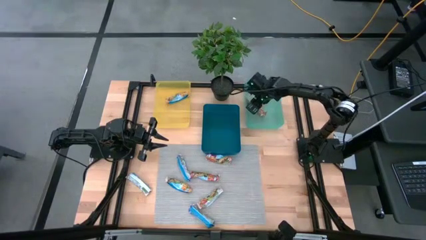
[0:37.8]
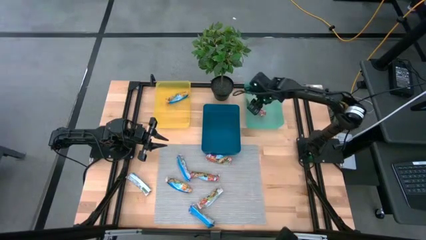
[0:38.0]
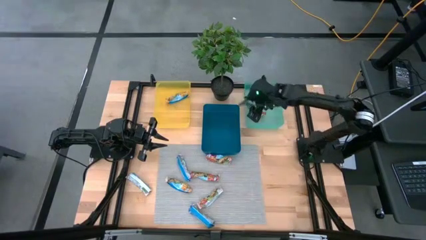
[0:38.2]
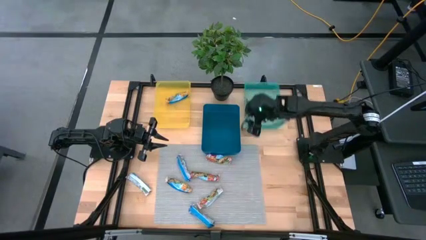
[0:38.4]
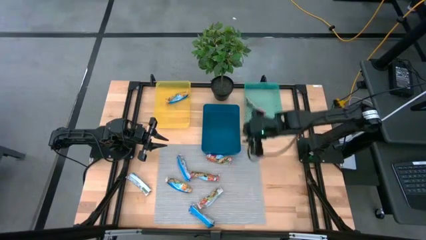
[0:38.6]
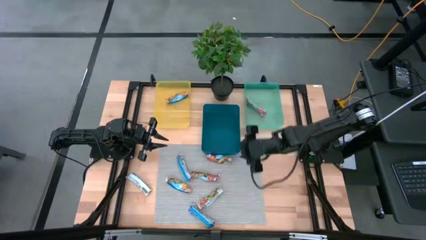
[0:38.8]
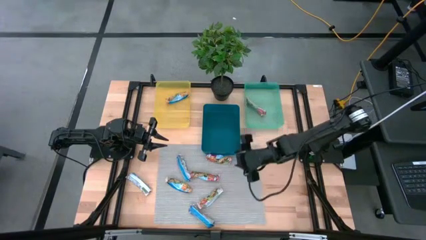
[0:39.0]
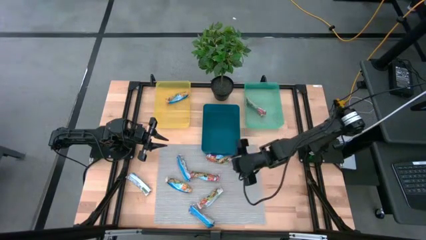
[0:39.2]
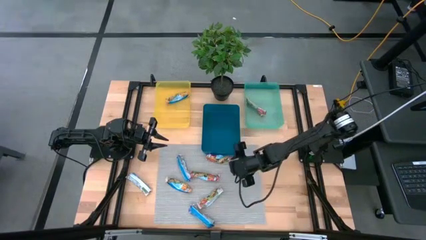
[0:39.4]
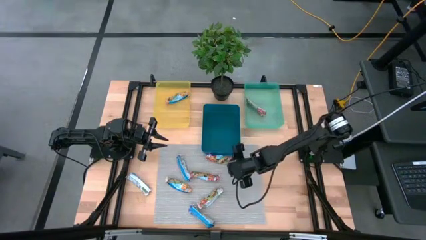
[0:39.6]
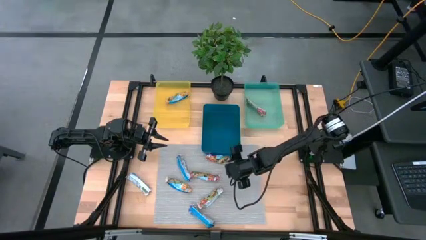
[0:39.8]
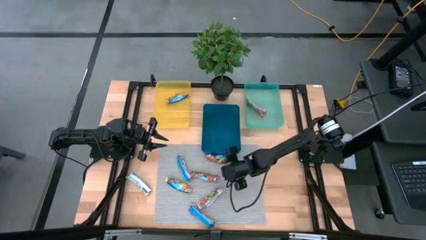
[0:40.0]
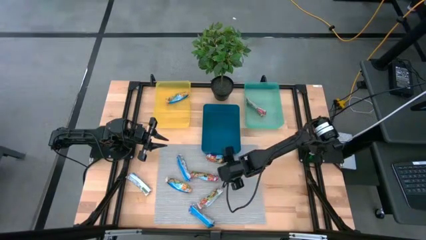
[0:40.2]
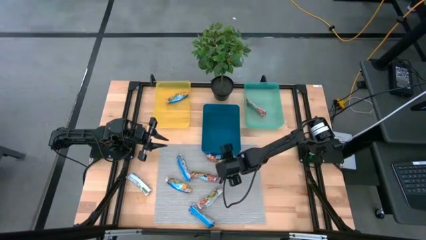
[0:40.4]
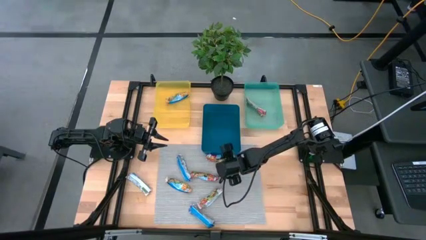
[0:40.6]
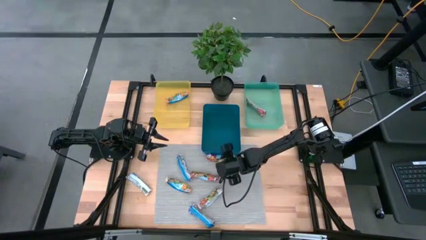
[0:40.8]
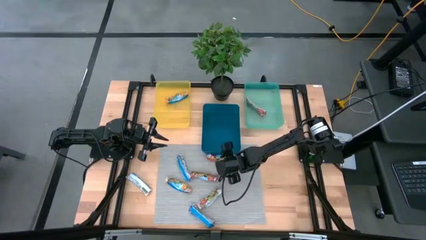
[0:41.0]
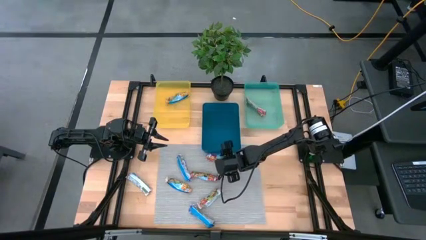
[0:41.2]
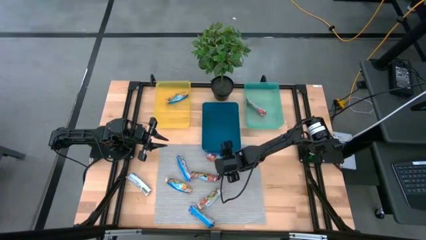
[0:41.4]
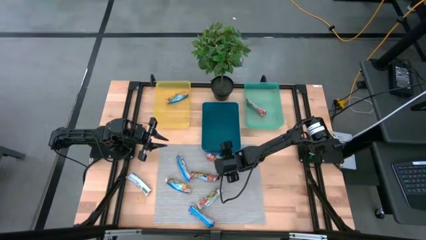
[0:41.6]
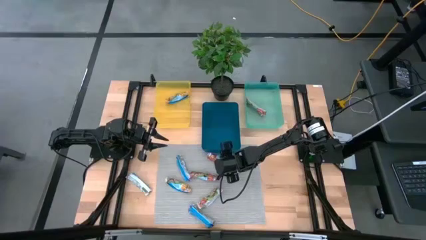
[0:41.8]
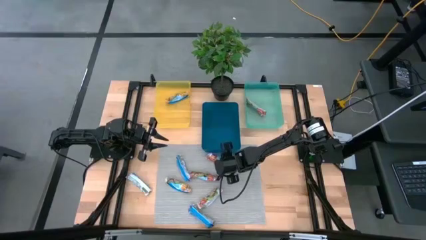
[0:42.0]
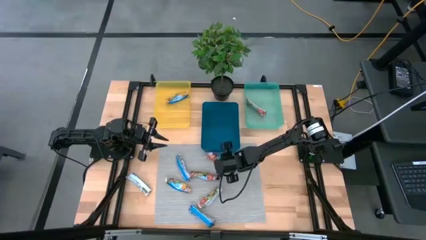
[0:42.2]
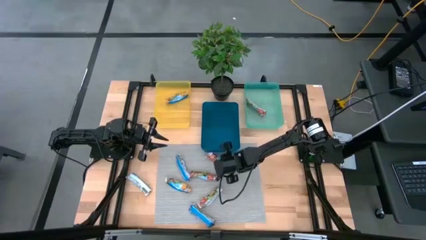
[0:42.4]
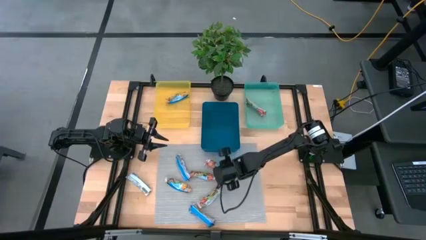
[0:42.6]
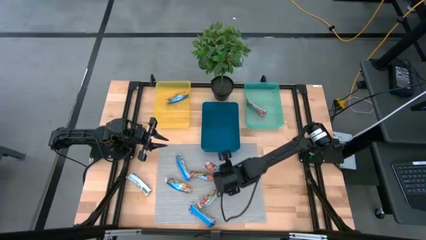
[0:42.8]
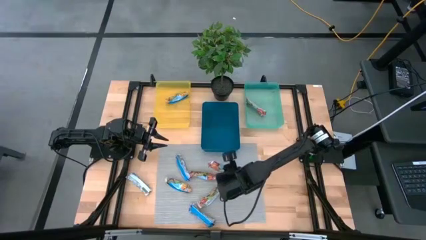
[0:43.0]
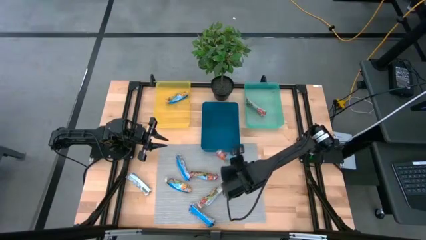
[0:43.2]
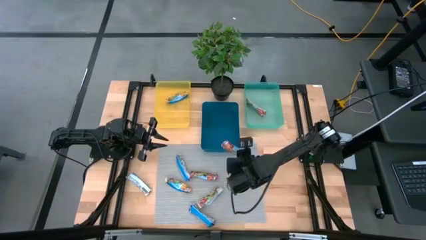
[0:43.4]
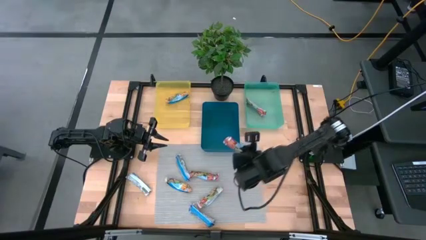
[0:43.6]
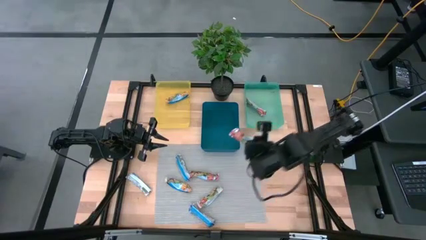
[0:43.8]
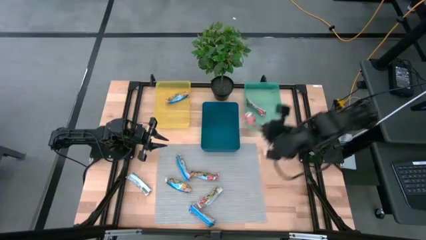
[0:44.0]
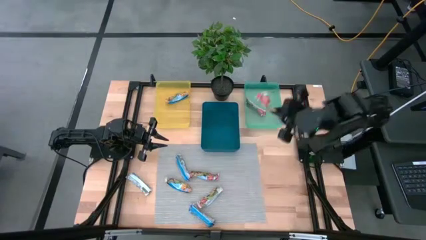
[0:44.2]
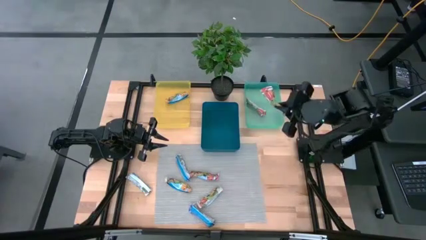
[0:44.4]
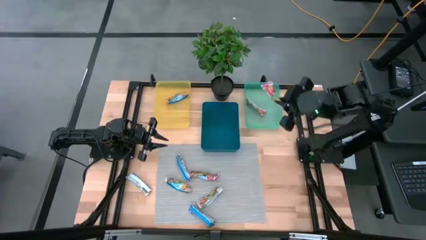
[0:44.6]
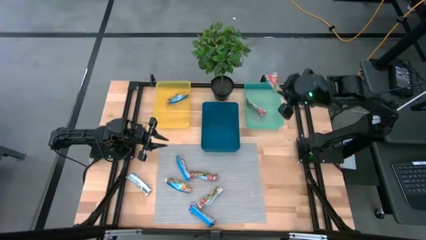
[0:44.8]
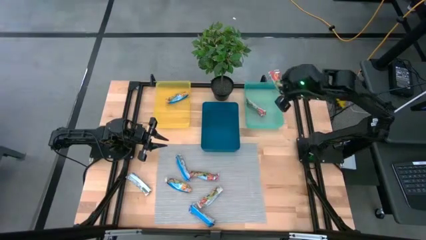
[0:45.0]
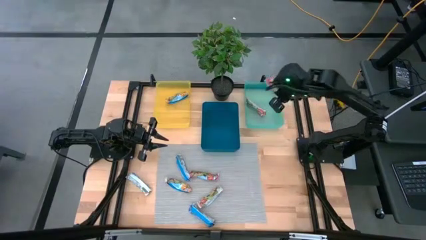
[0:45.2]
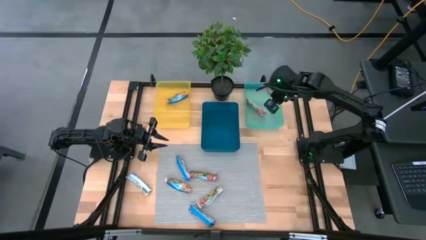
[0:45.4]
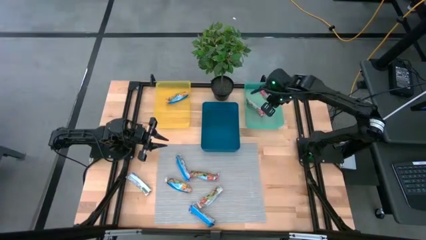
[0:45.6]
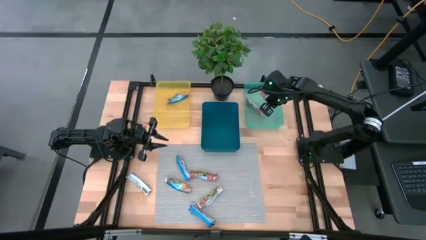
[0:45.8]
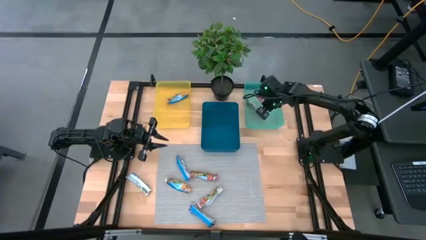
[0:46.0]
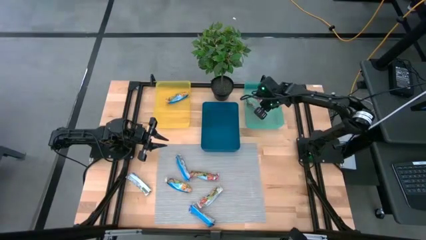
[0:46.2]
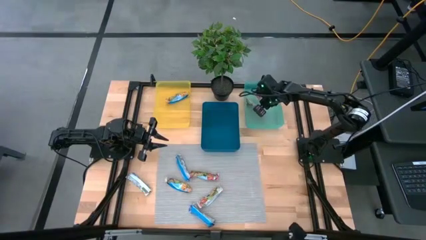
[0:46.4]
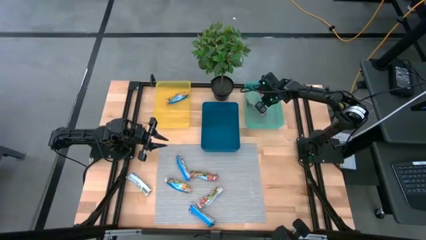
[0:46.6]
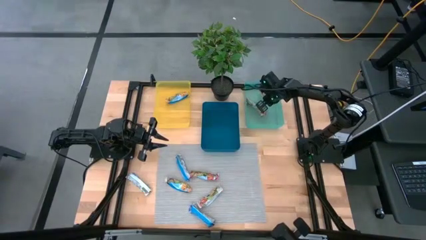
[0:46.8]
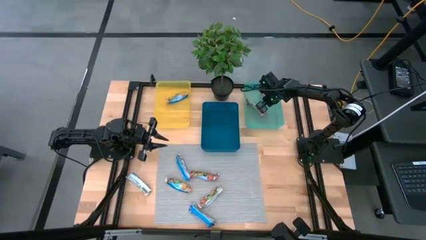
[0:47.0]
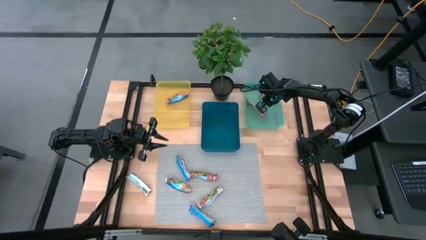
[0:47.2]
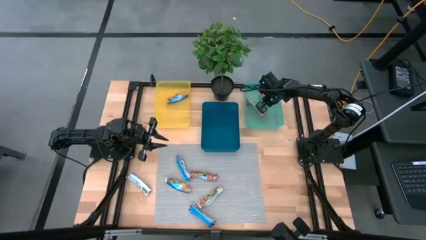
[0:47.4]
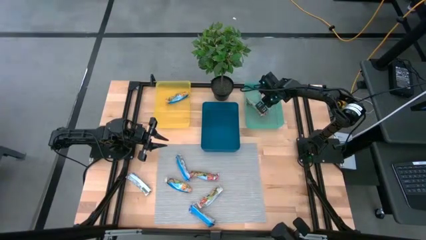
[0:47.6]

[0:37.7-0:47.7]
Task: Pick and place Granola Bars by type
Put the red granola bar into the green bin

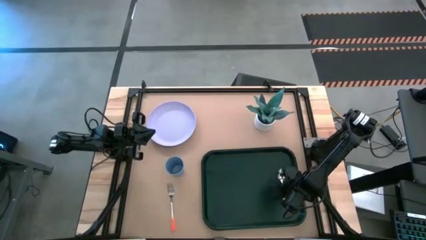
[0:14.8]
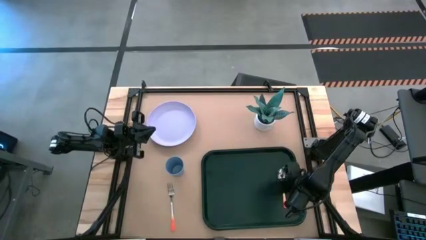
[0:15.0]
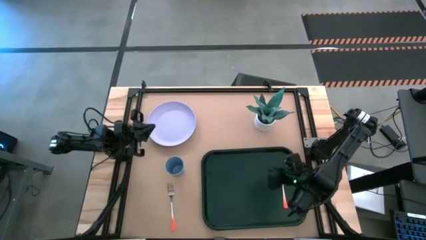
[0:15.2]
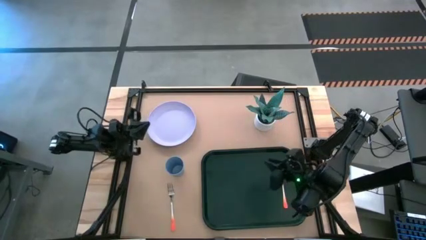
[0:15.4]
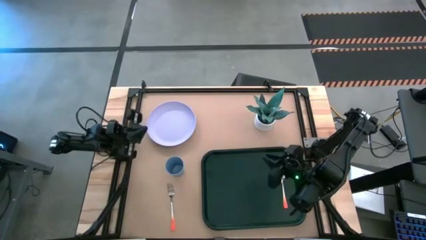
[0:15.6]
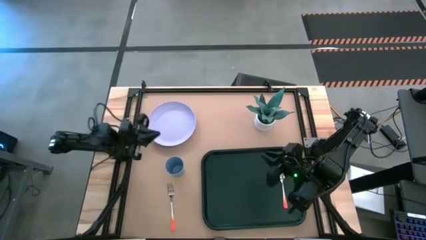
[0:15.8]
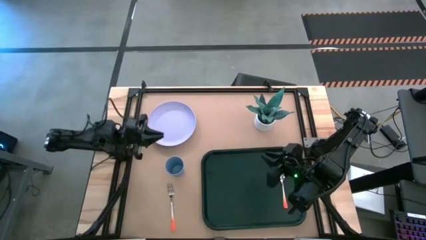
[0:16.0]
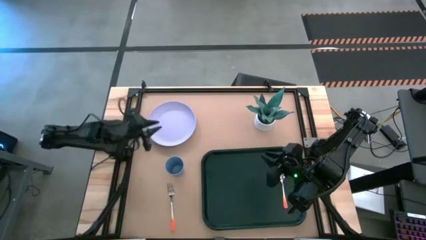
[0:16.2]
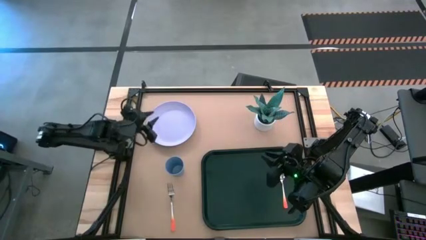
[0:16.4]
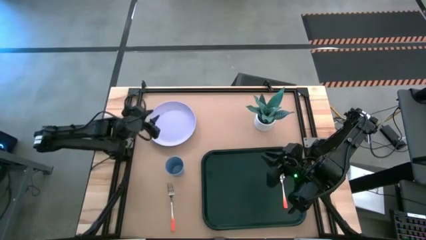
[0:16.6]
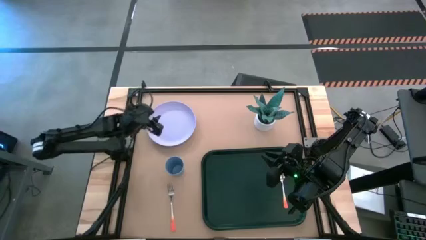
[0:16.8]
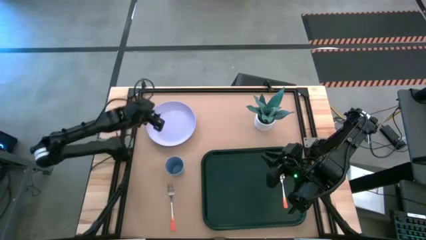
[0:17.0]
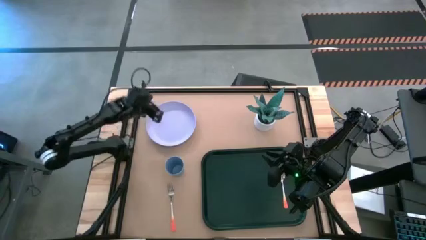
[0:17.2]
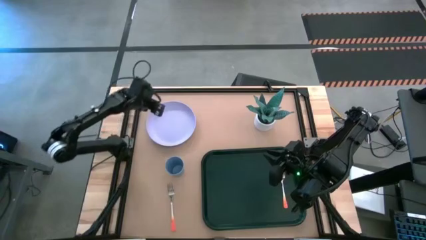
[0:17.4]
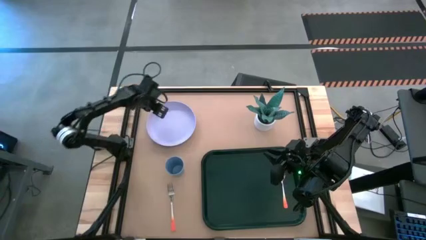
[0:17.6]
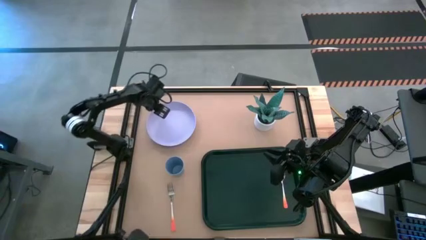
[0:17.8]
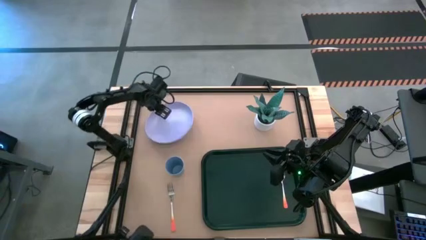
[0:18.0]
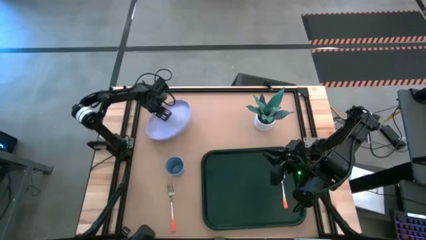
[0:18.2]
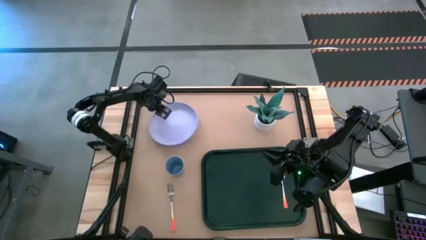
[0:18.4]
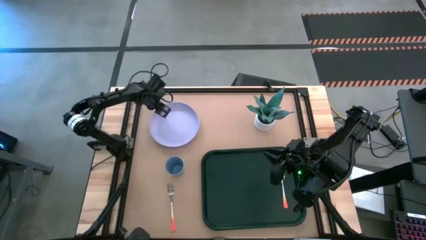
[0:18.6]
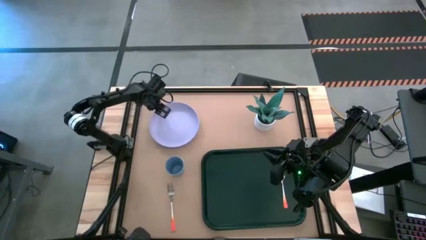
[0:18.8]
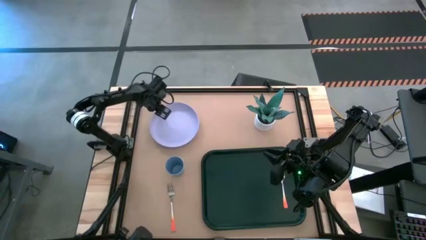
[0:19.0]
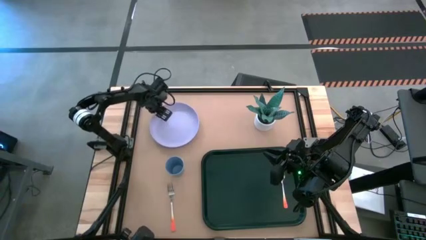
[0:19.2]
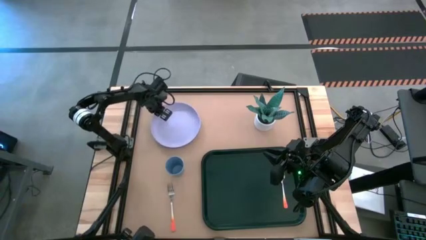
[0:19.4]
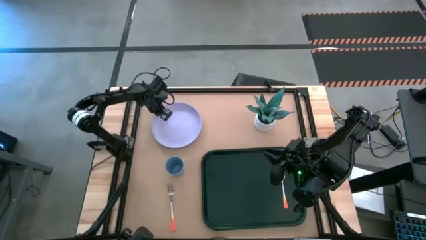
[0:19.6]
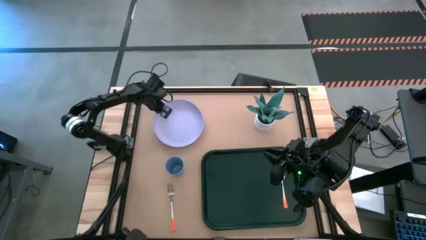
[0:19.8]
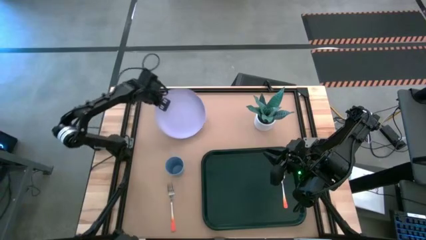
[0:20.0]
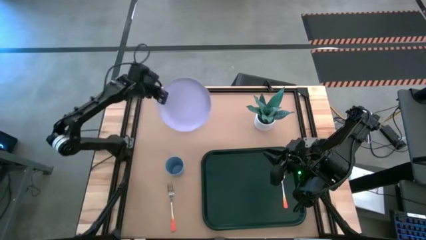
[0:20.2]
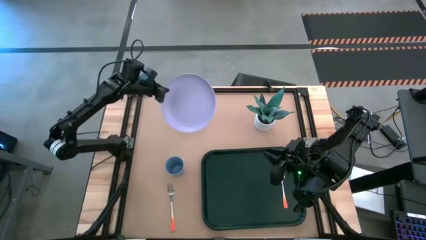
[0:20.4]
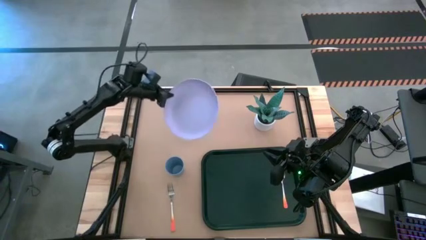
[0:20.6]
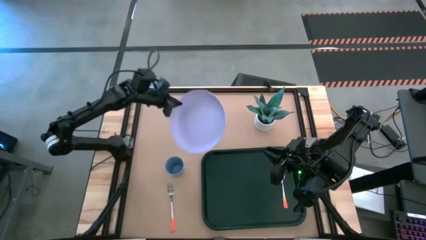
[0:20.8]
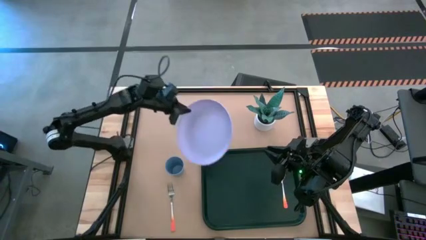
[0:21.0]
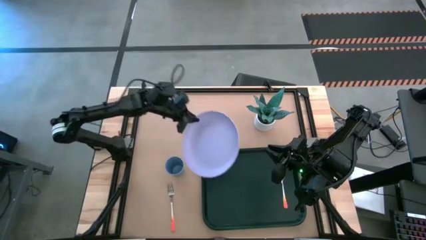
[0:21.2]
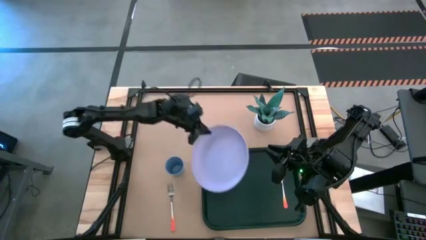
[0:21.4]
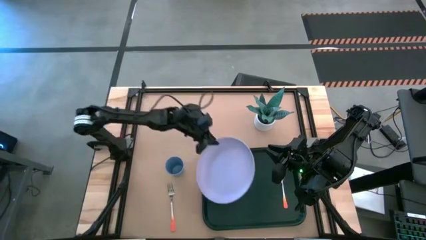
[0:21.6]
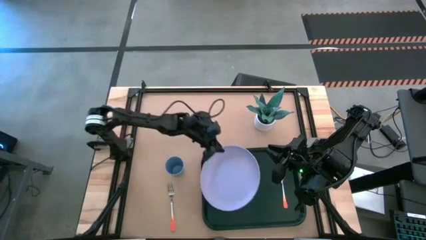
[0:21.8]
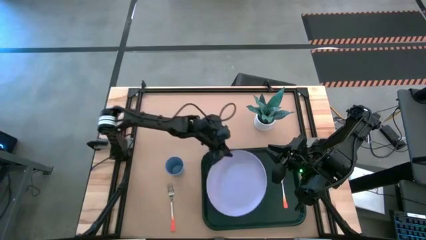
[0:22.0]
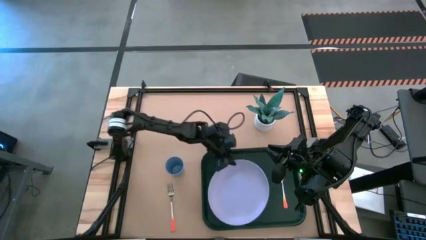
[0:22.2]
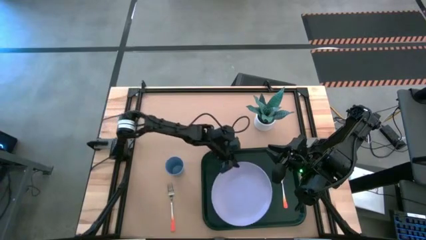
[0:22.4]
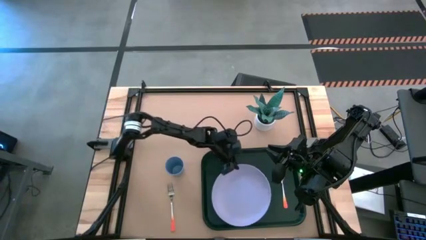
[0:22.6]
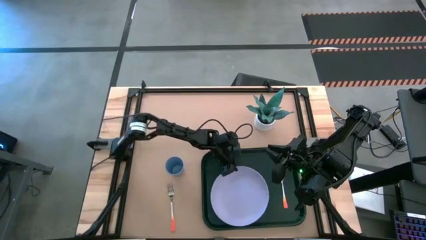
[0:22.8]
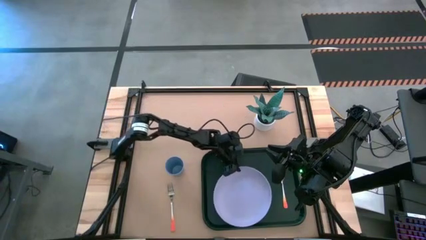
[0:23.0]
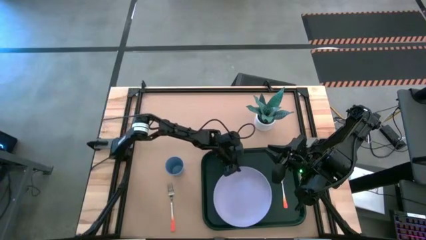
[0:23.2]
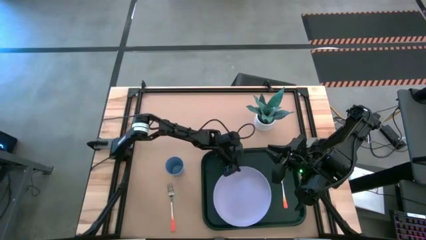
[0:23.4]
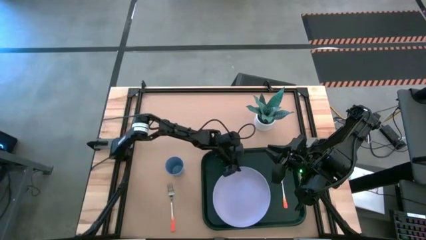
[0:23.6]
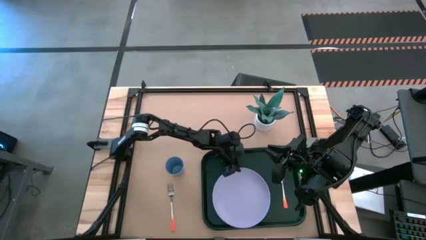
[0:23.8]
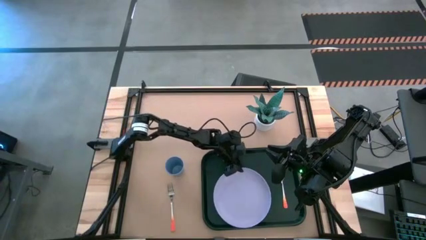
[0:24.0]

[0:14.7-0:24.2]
Task: Pick and place plate/cup/fork/spoon on tray
Put the purple plate on the dark green serving tray to the right of the orange spoon
